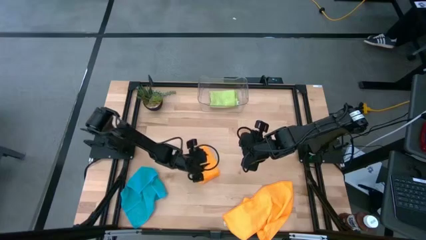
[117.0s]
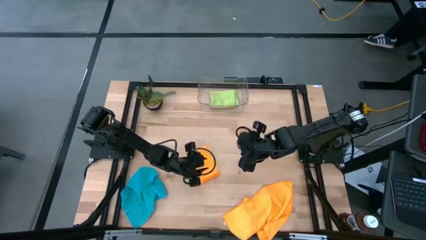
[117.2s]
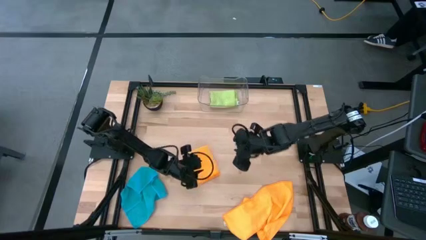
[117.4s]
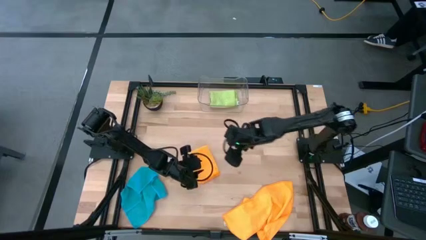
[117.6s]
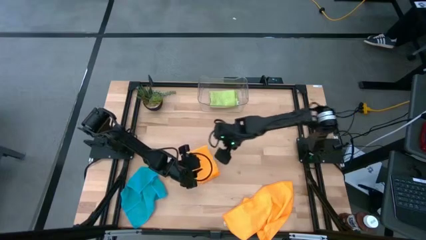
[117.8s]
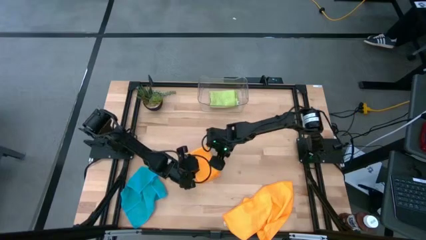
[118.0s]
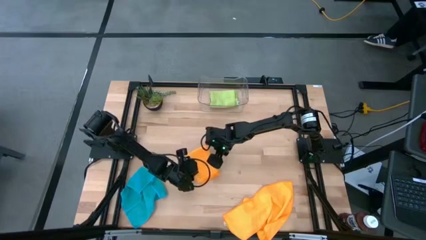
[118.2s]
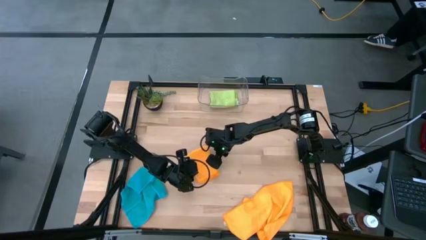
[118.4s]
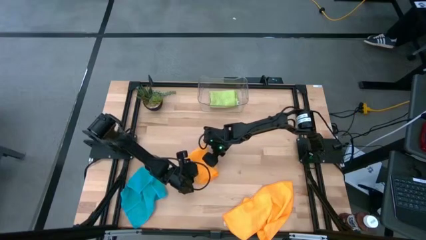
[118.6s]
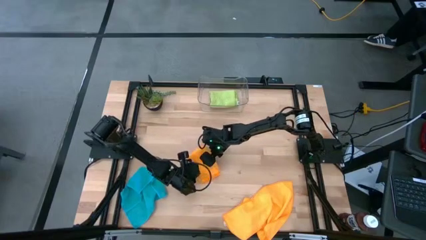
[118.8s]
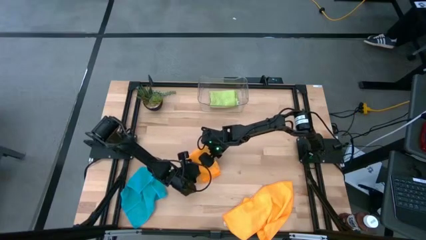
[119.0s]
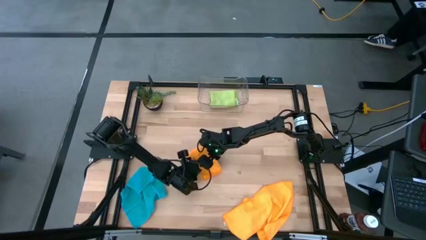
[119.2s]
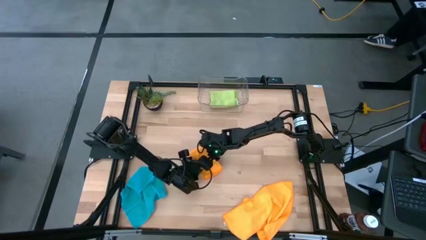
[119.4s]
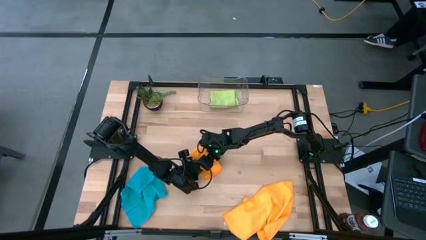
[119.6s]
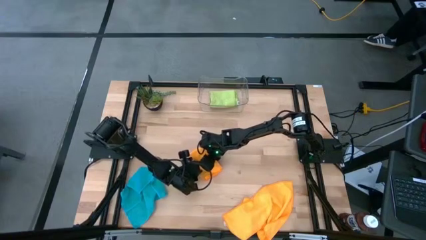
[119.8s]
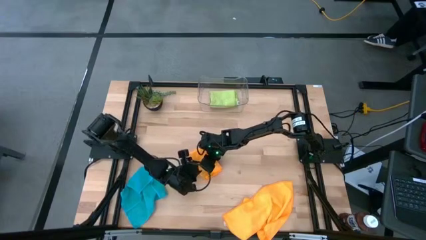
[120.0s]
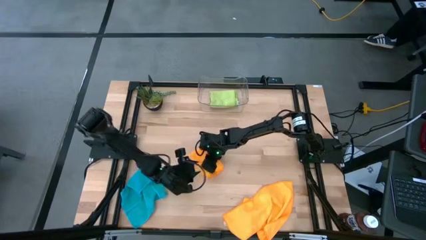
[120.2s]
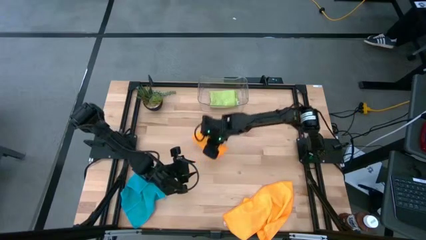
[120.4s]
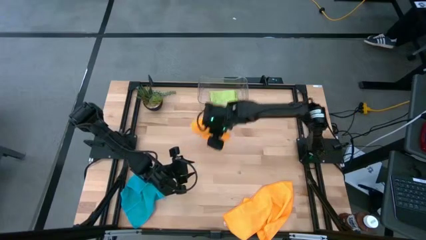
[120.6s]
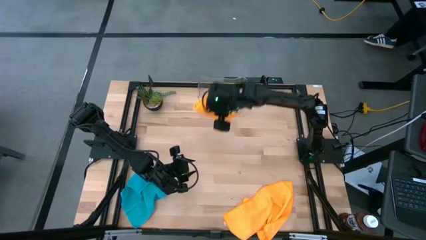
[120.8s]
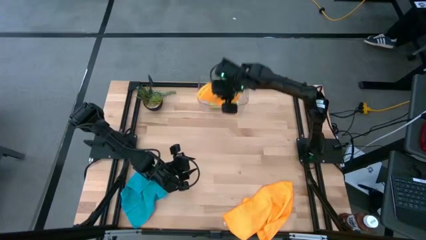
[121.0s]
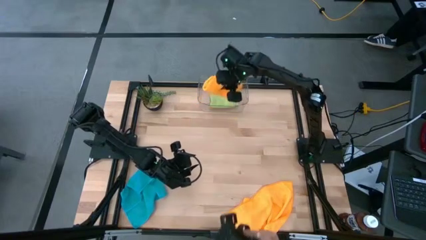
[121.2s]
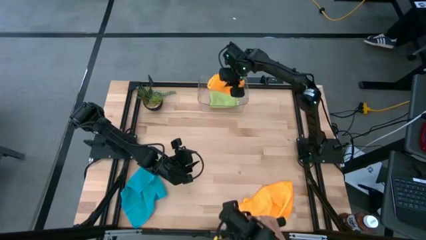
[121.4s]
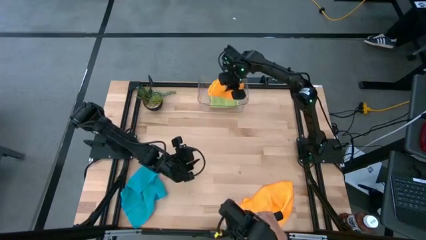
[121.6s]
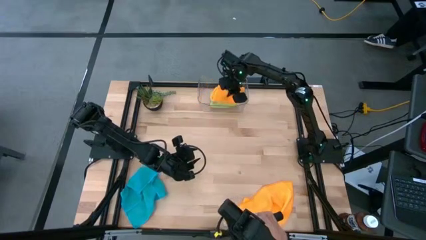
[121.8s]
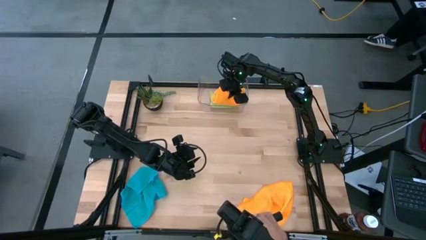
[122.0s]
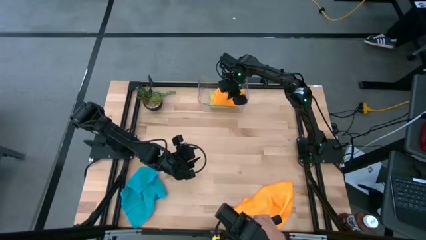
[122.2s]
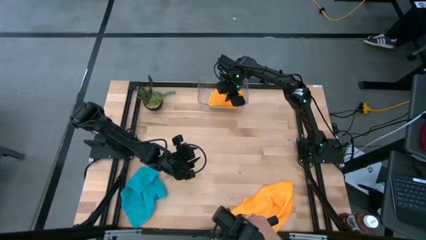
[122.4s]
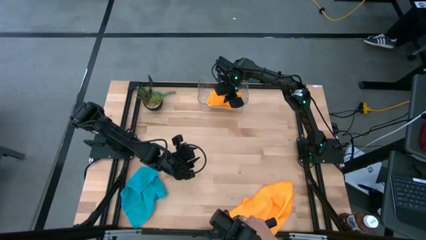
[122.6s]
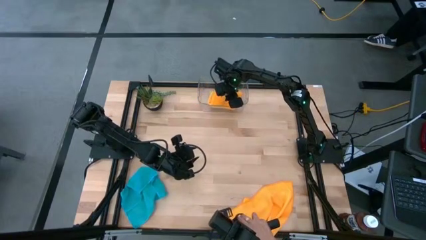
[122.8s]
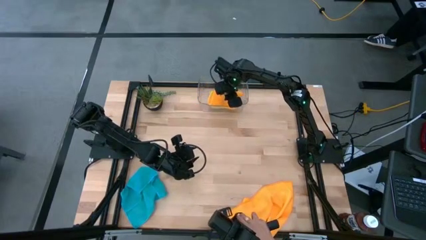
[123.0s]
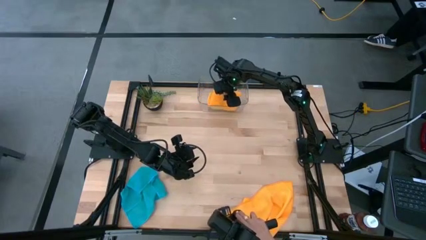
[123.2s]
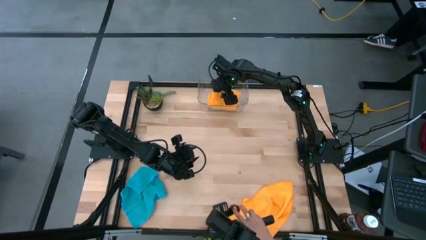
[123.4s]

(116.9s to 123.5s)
Task: Fold microfiber towels
Put the top orange microfiber cloth into the transparent bin

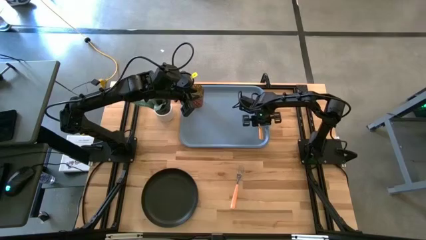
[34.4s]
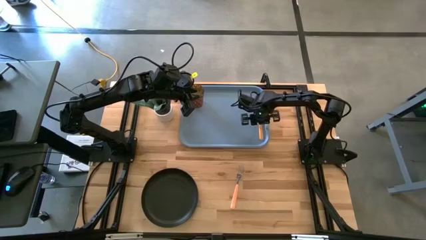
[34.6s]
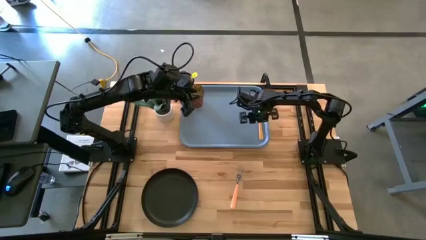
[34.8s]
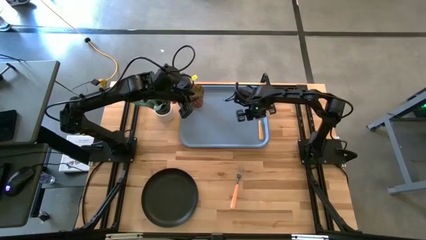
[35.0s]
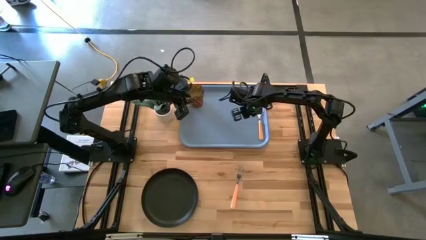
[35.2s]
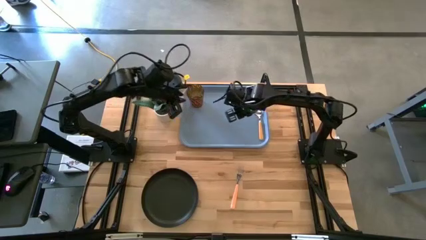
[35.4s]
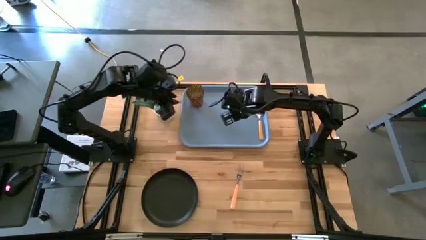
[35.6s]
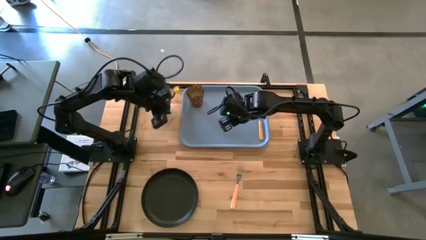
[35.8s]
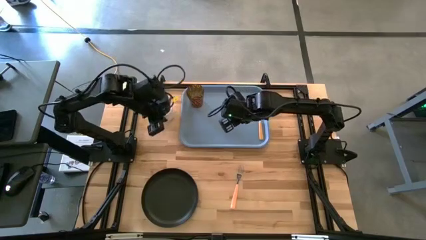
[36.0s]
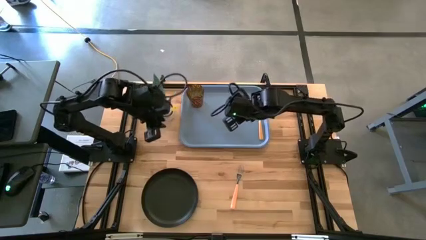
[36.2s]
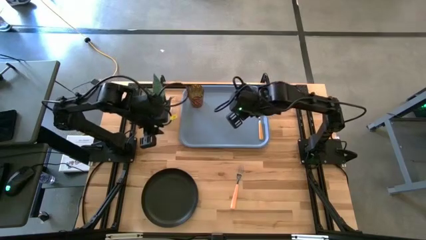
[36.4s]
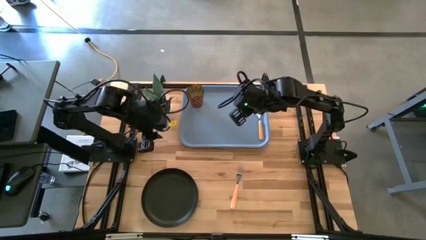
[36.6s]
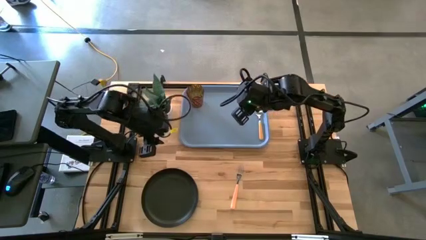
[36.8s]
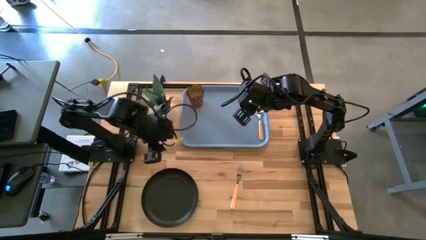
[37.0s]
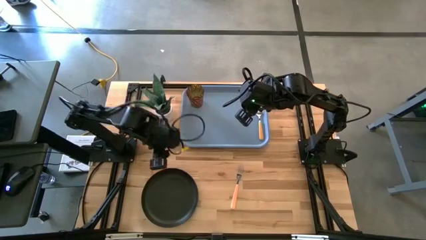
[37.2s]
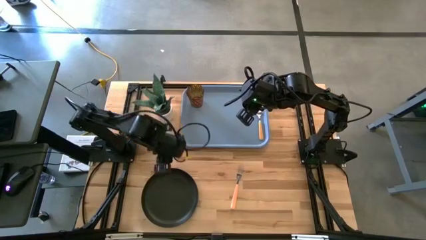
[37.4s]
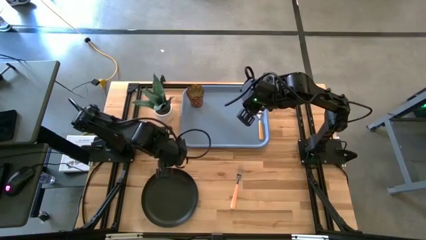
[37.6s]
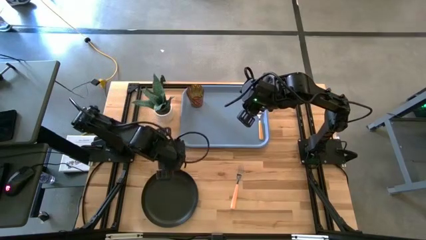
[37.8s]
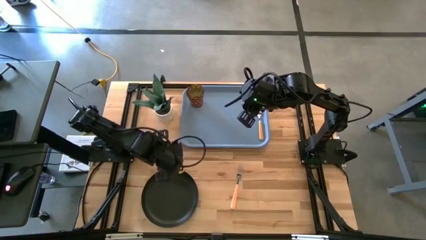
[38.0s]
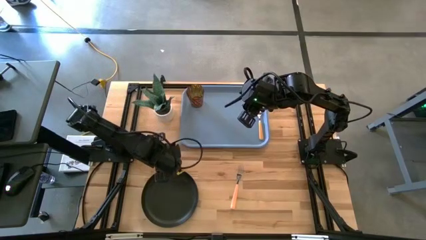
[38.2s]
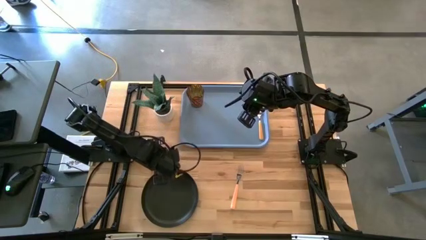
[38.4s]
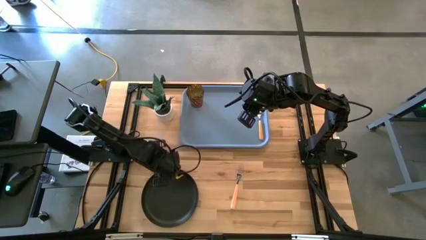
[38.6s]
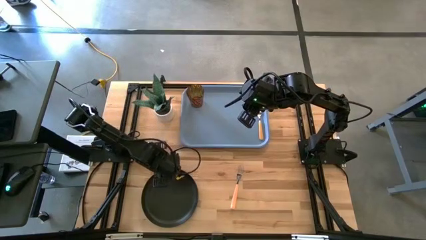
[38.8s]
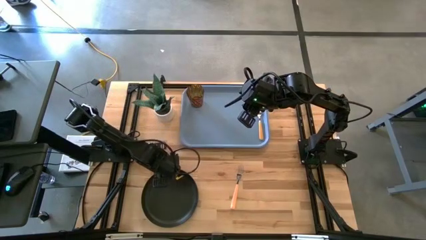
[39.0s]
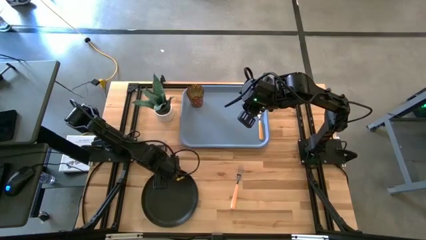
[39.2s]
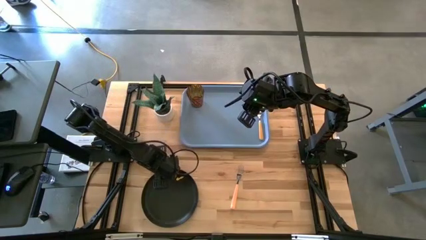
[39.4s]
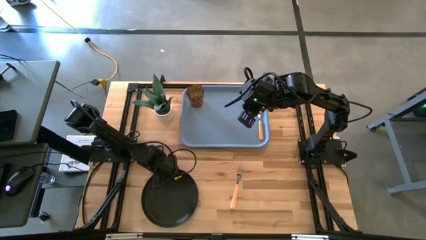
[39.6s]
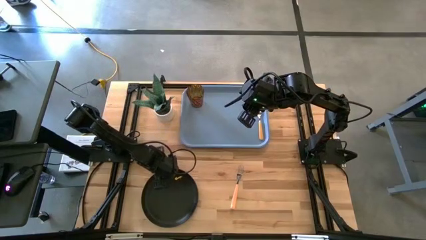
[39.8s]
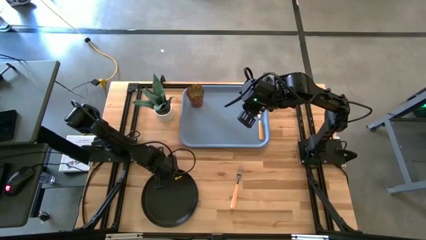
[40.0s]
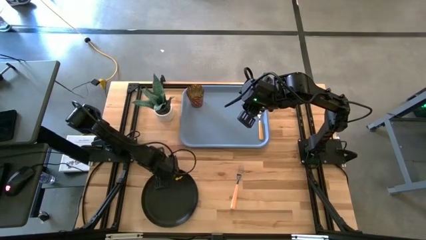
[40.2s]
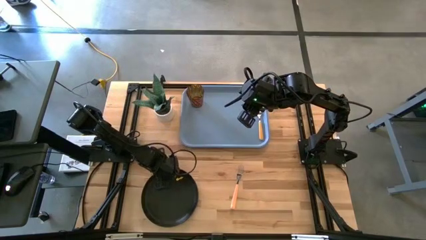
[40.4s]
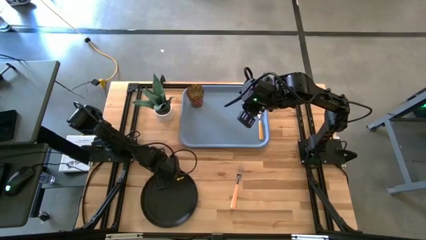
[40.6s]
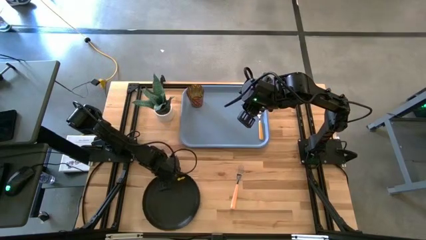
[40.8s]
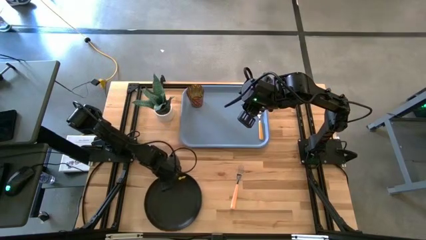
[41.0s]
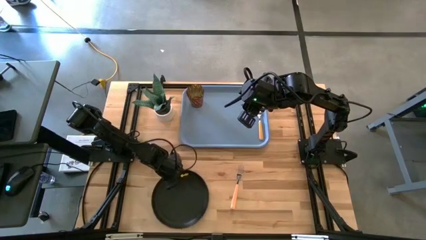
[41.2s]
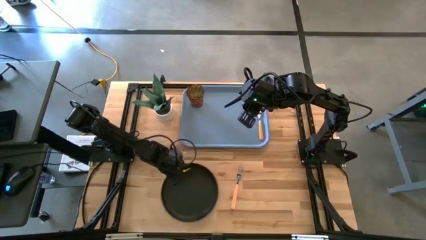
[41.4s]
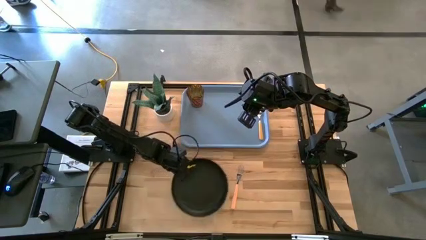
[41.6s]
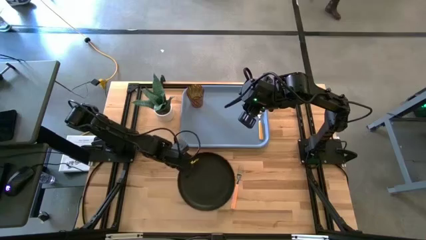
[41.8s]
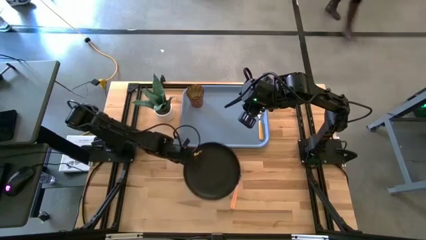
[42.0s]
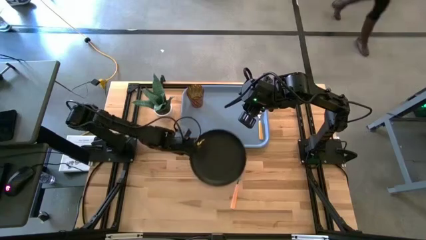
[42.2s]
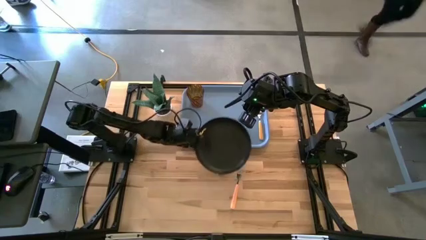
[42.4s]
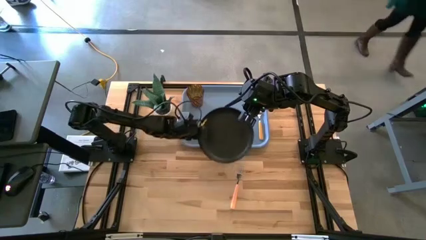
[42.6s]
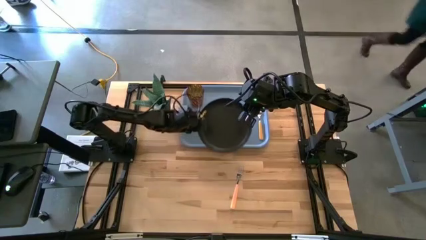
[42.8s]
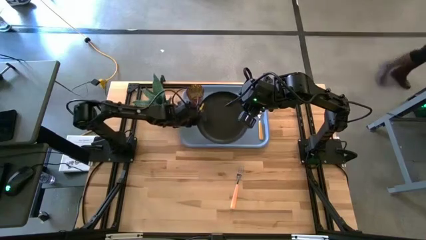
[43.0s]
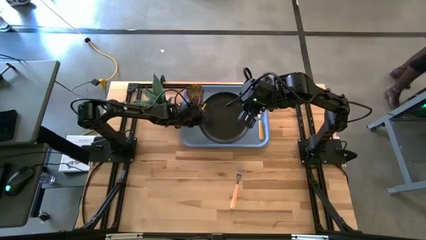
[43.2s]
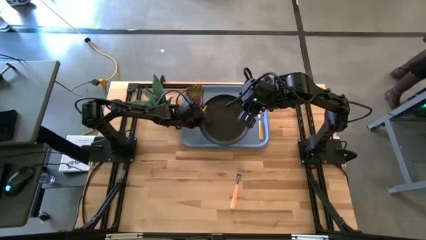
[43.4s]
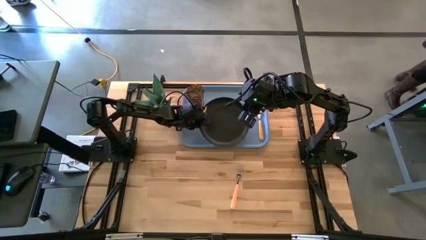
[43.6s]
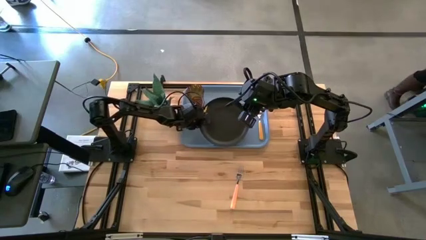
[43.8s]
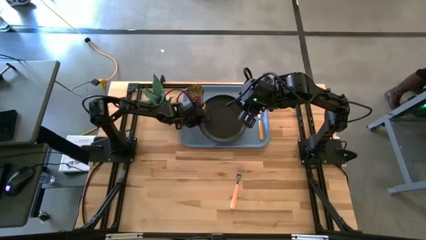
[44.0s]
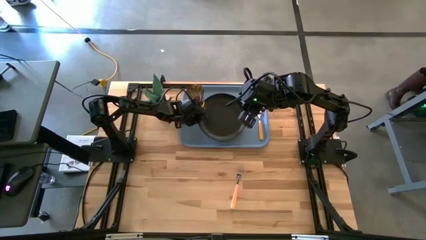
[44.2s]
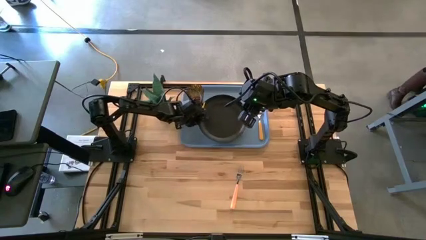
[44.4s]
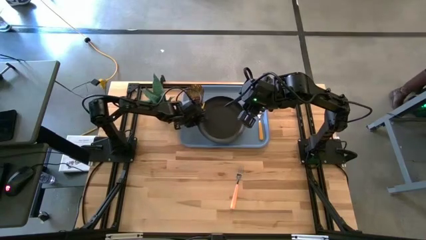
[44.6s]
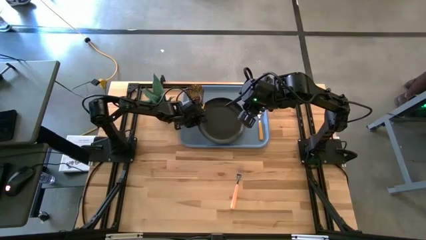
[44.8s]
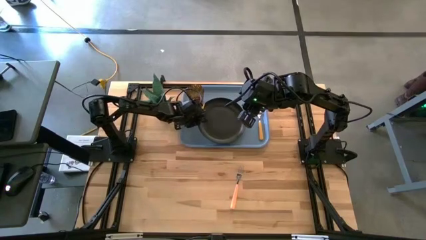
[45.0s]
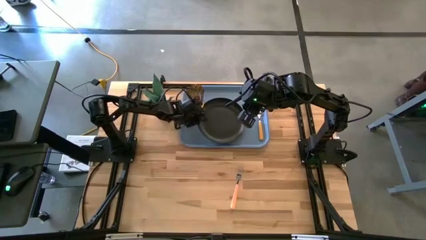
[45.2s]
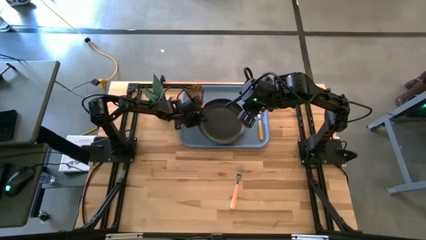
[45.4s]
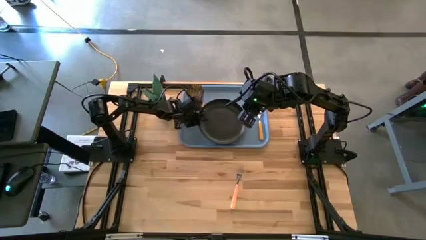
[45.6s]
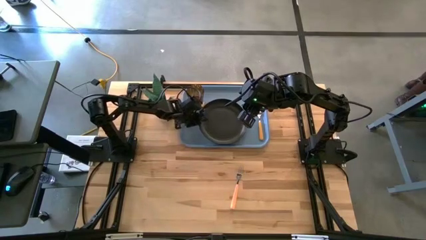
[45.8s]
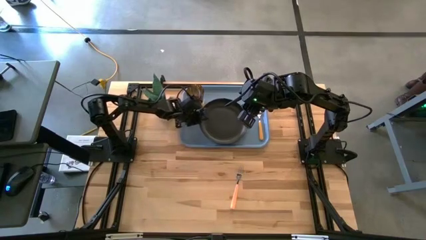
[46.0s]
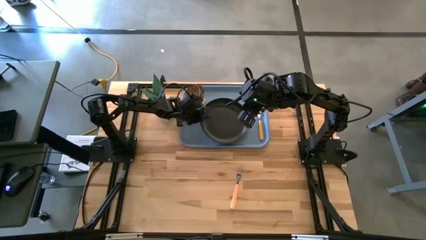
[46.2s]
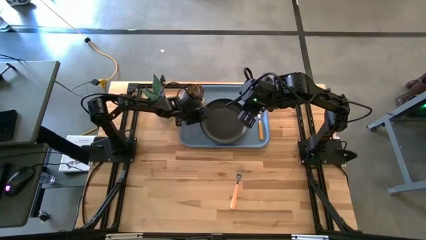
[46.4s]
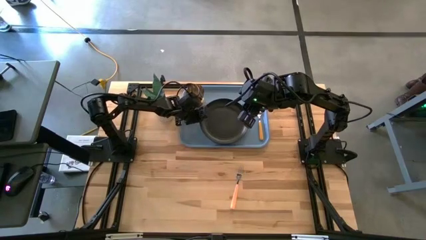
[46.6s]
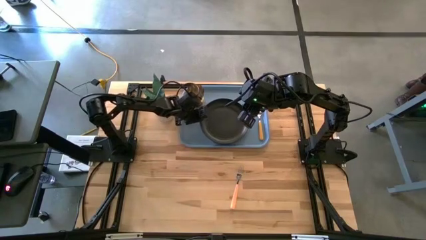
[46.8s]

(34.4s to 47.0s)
Task: Pick and place plate/cup/fork/spoon on tray
Put the black plate in the bottom center of the blue tray
